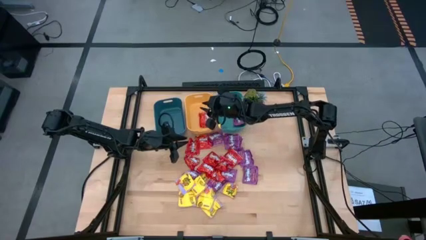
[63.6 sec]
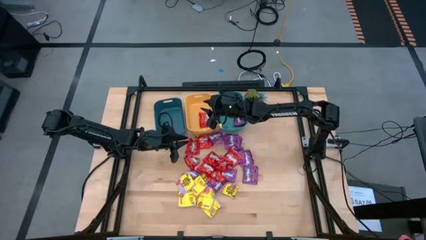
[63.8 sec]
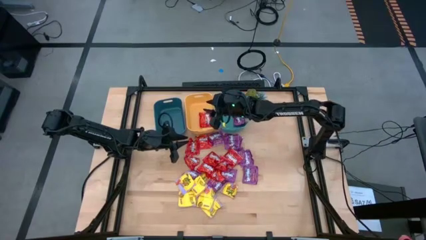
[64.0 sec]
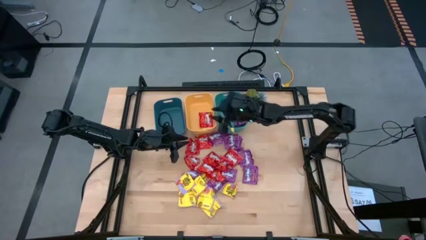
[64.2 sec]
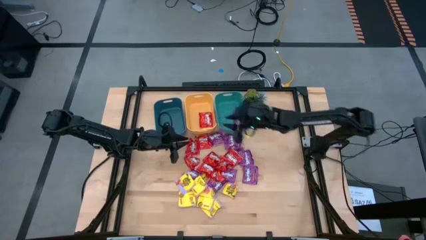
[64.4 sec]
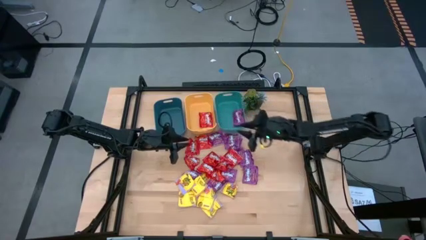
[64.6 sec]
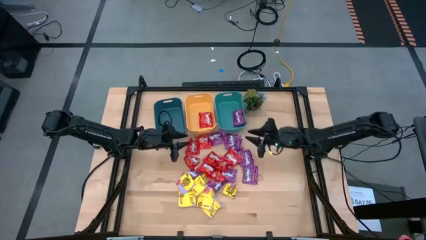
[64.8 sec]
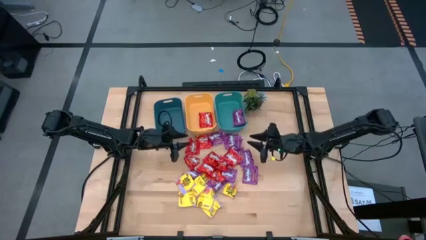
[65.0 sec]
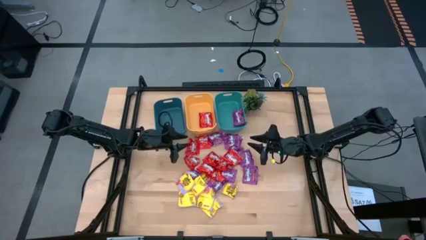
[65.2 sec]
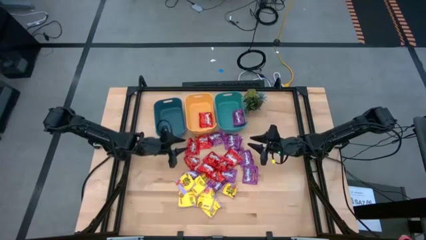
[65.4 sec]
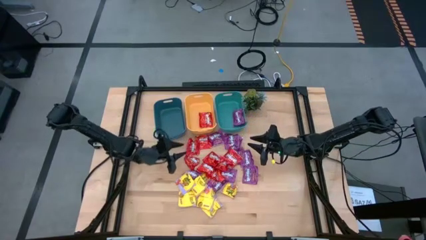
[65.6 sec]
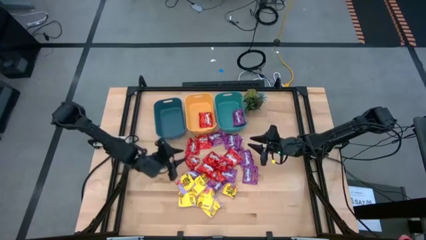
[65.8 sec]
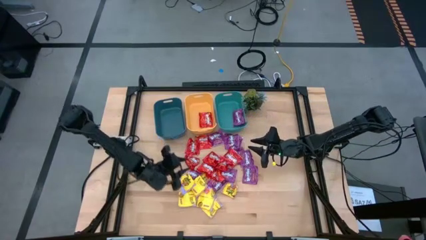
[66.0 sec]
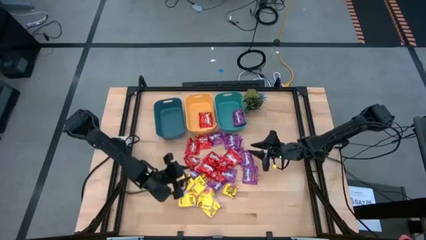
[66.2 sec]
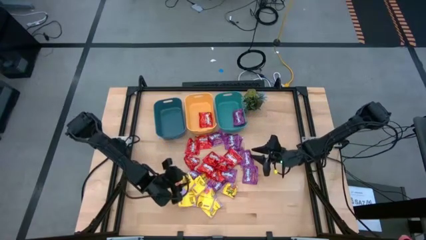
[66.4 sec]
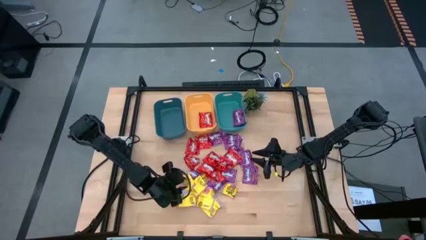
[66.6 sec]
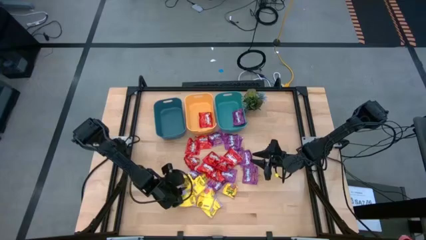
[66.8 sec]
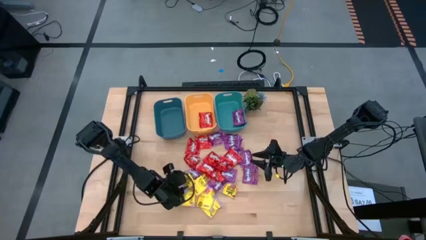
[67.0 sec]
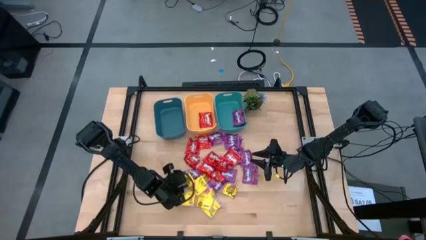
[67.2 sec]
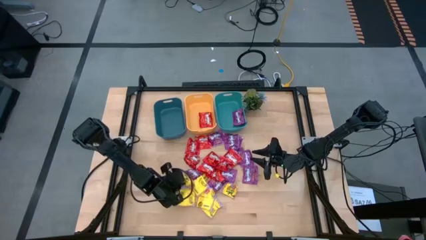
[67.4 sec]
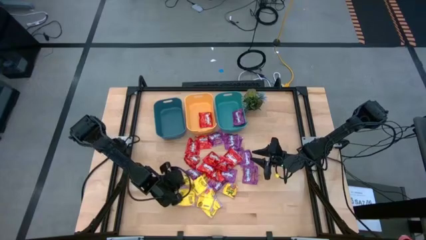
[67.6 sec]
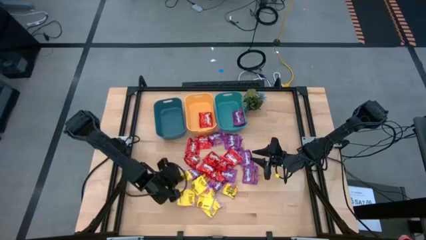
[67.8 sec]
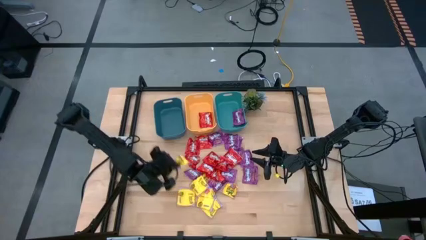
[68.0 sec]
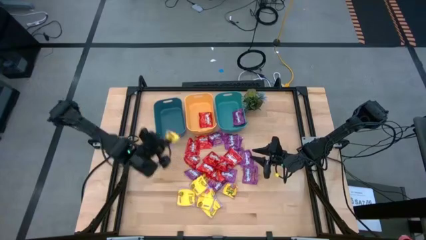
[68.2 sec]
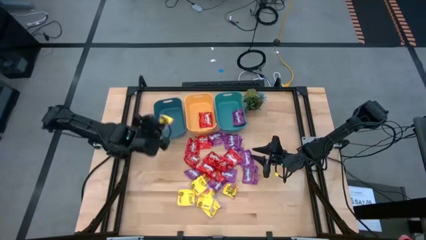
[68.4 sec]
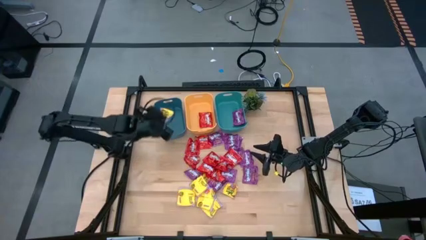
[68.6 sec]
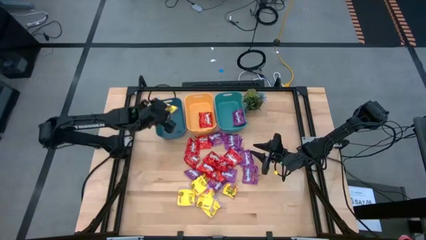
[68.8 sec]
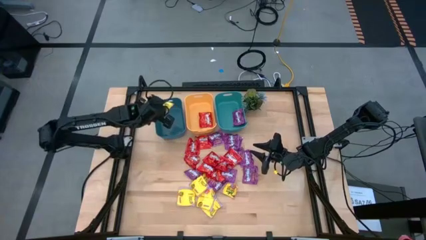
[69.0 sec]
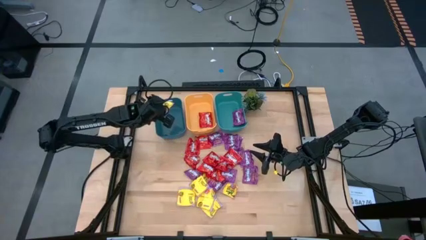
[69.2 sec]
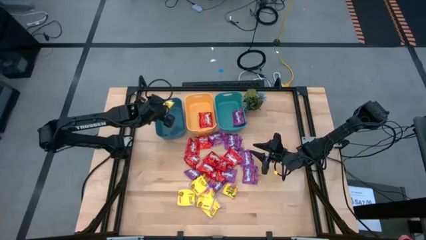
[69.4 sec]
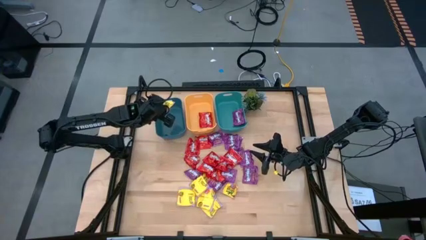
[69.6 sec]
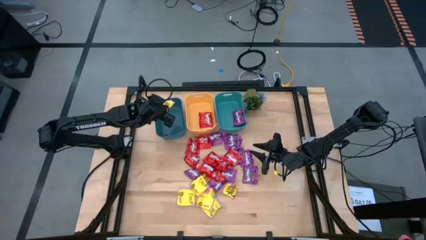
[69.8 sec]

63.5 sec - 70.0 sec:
Task: Sort candy
Put the yellow candy into the blue bin

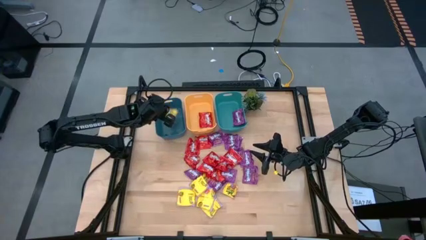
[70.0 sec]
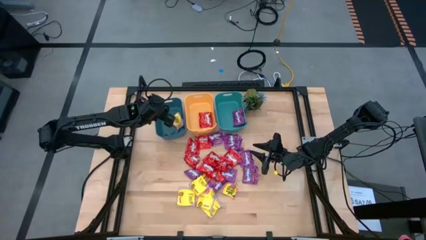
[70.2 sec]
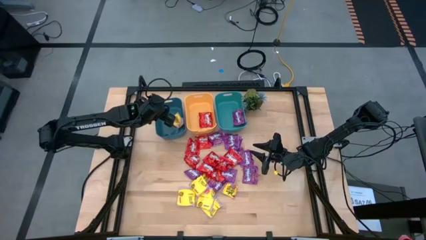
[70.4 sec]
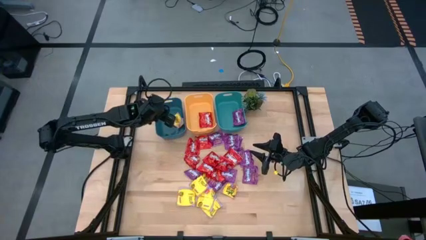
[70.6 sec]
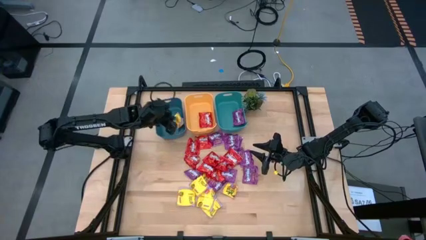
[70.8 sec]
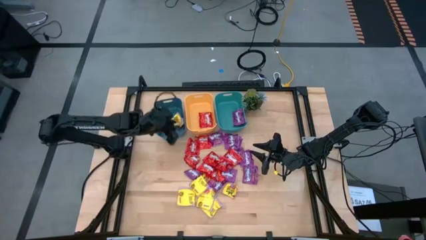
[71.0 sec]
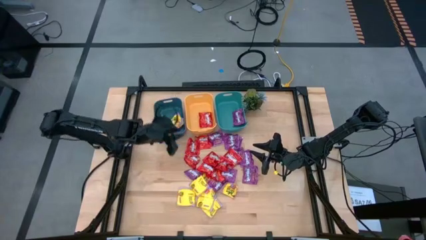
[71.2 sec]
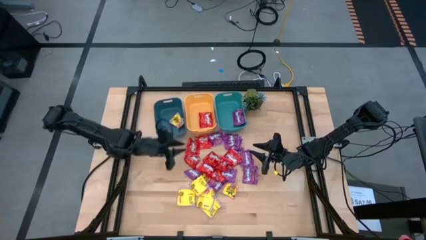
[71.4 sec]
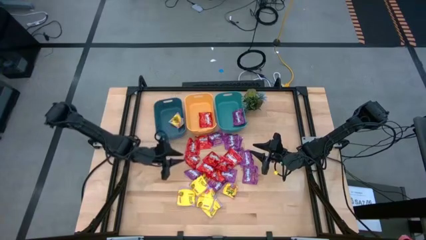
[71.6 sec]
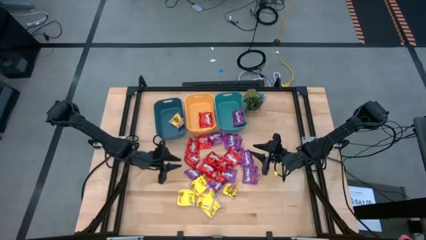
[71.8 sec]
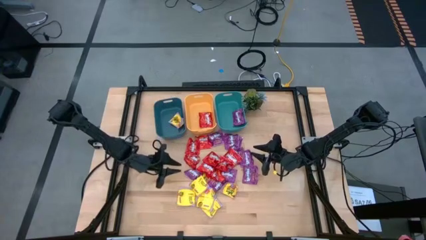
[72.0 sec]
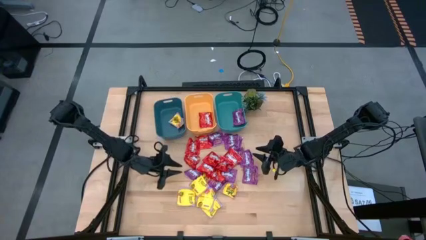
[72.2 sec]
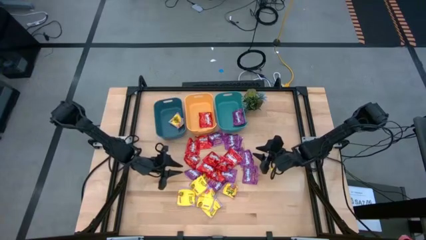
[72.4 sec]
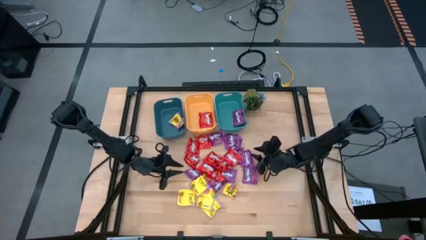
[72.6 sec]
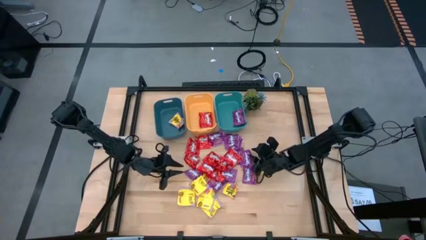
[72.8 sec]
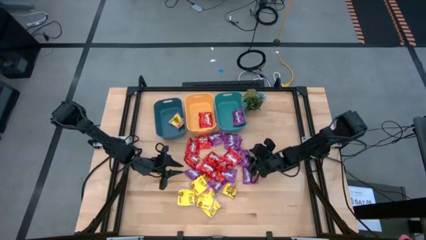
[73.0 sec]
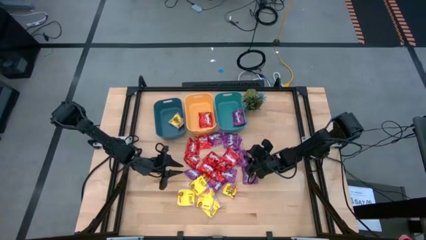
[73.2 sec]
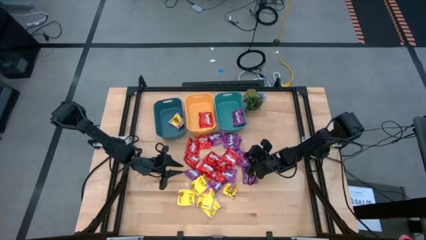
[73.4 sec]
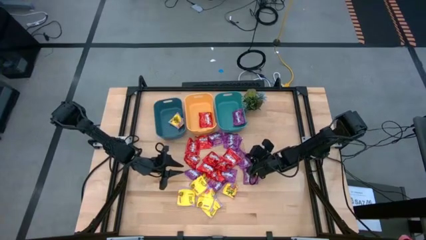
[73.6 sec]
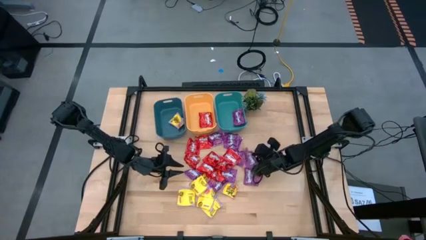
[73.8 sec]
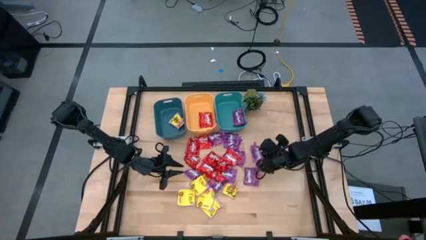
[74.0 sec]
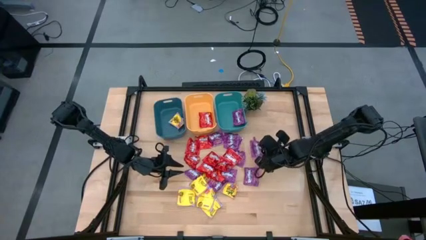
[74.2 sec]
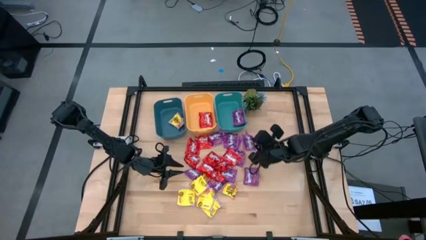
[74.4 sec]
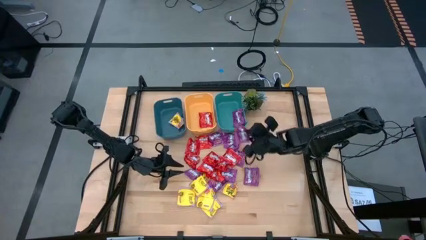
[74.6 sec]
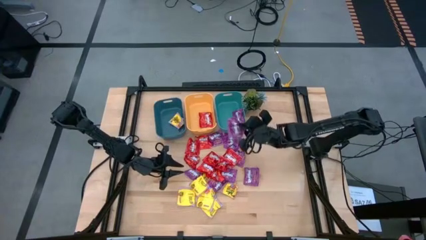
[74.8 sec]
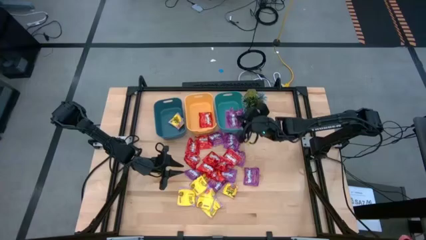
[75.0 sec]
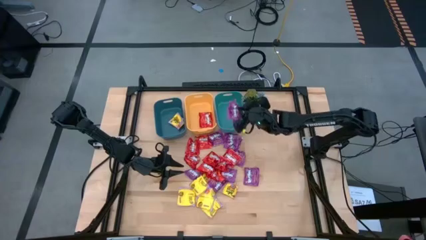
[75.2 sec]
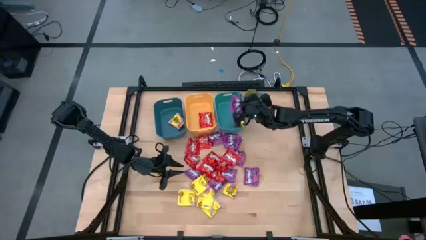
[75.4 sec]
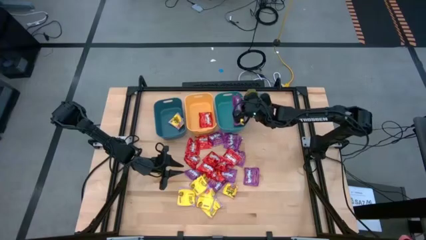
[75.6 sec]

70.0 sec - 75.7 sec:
Put the purple candy into the green bin

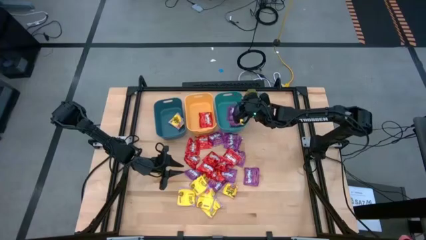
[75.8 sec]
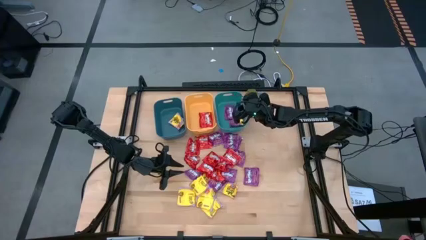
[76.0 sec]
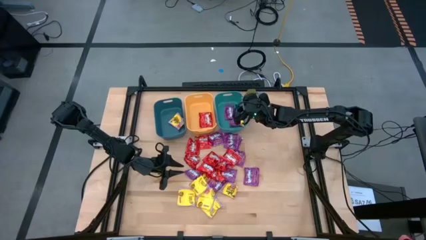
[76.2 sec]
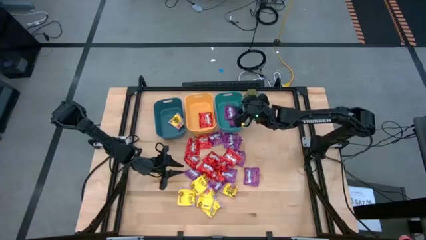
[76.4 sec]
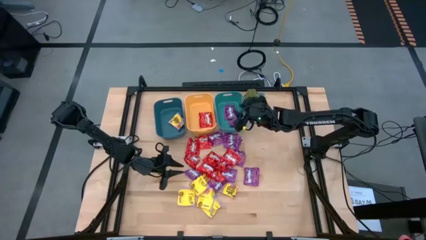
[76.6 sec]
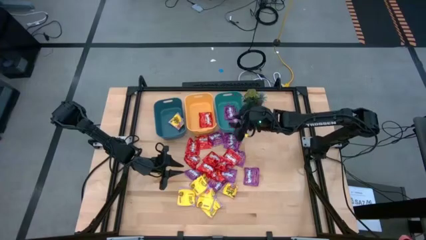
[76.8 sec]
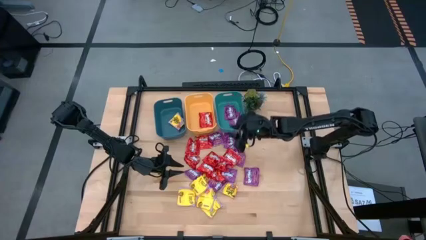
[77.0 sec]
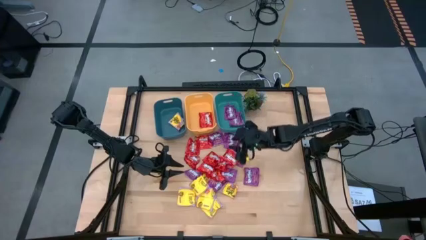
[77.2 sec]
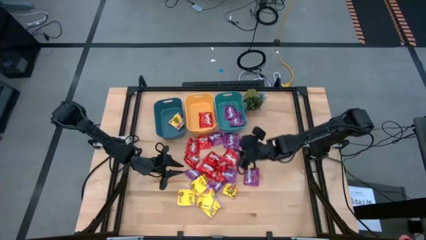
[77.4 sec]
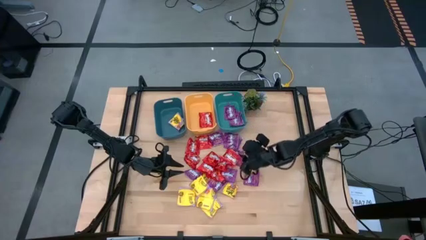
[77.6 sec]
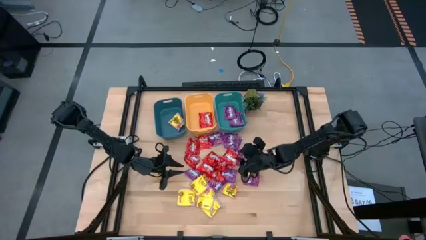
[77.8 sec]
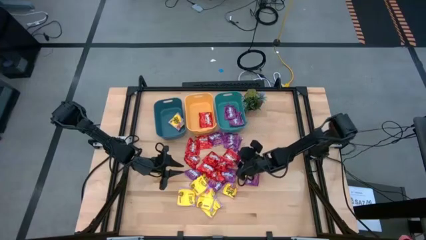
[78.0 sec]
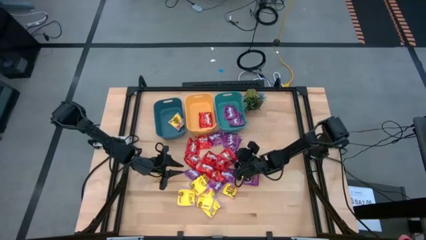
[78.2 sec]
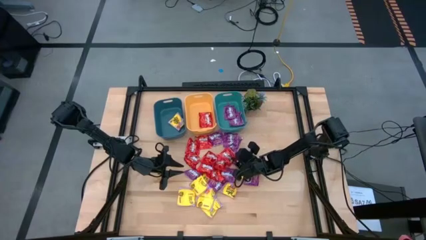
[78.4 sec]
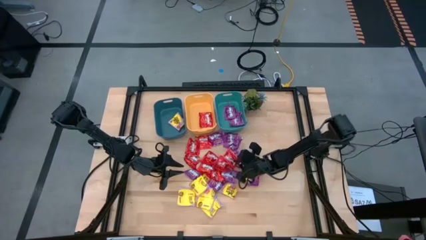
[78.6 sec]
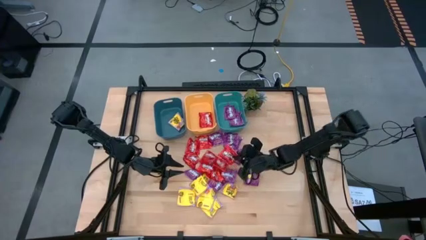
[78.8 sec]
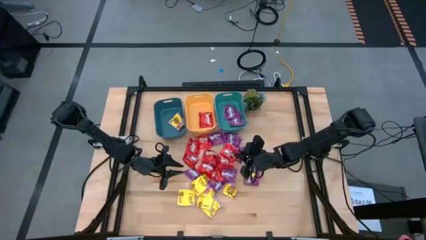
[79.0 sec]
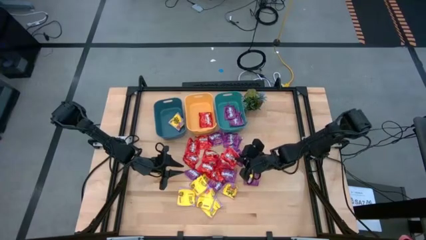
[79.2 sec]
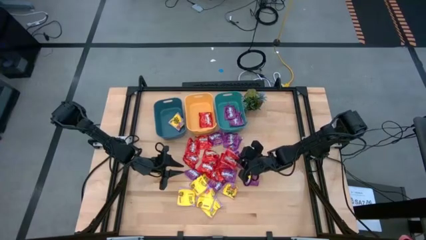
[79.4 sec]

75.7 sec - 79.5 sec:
Put the red candy into the yellow bin

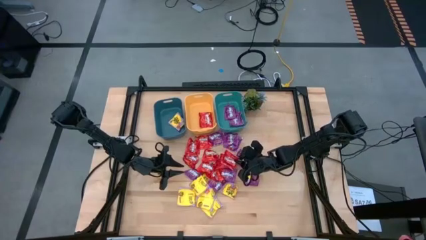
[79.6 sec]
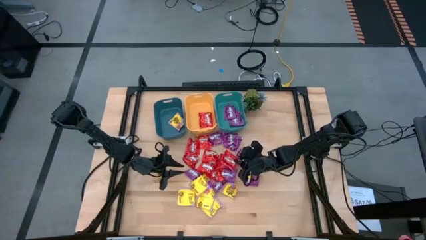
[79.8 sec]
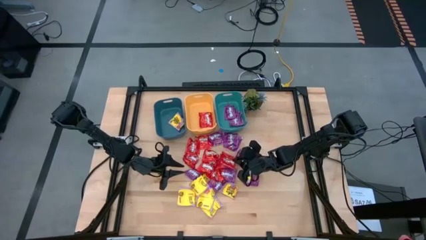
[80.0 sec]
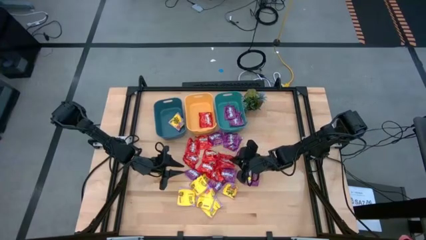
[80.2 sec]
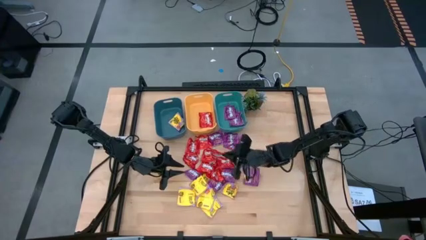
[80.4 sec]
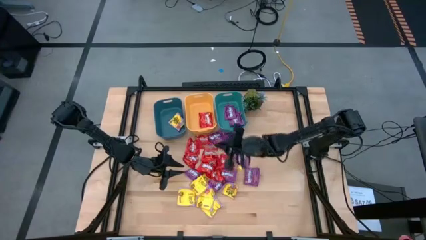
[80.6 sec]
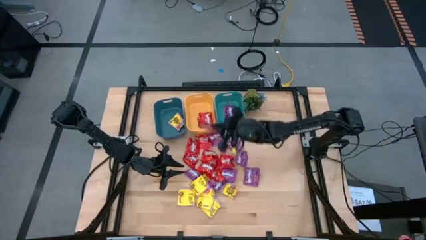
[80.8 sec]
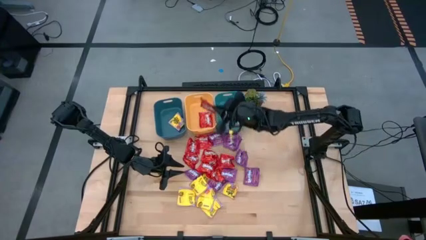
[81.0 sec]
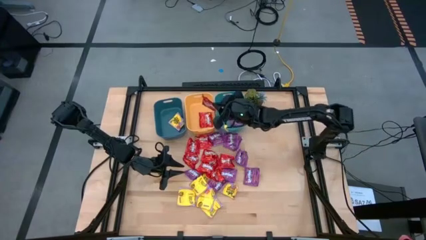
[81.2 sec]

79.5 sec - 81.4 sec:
Put the red candy into the yellow bin
